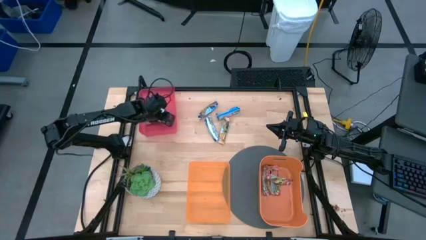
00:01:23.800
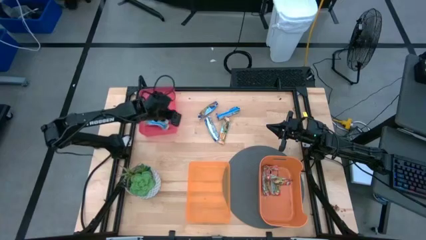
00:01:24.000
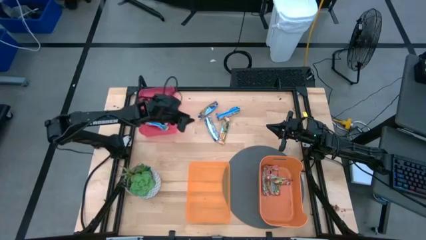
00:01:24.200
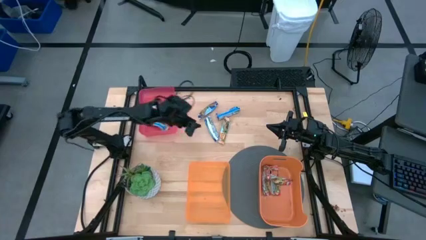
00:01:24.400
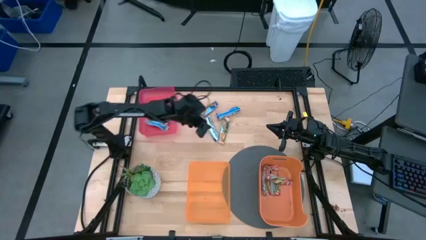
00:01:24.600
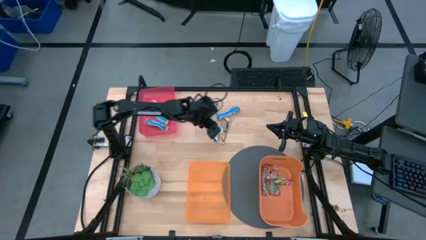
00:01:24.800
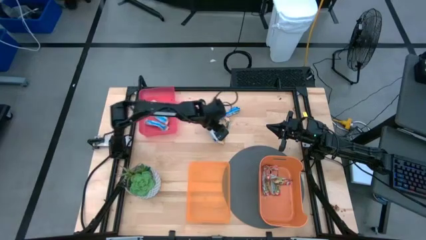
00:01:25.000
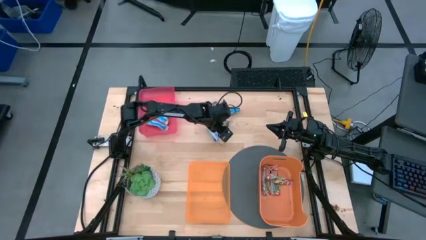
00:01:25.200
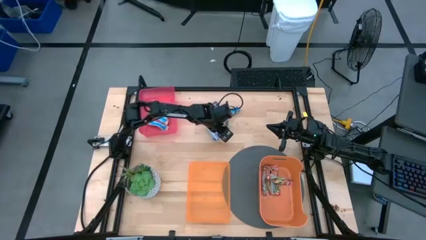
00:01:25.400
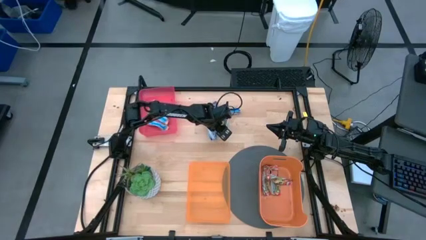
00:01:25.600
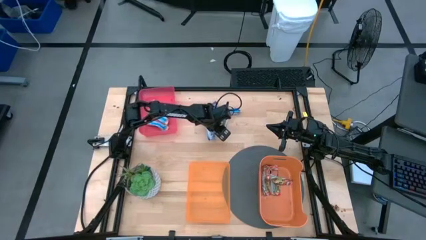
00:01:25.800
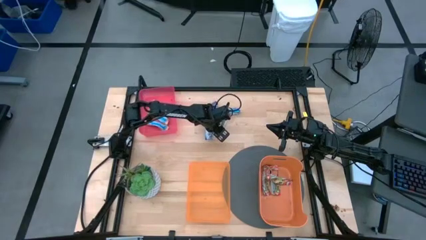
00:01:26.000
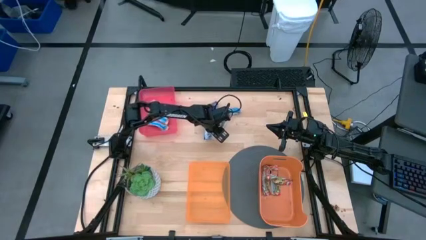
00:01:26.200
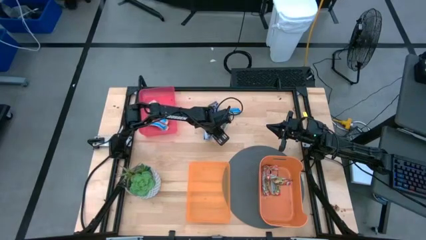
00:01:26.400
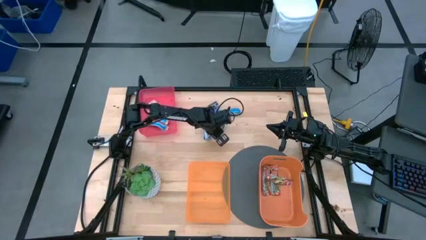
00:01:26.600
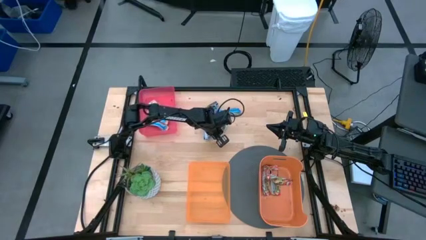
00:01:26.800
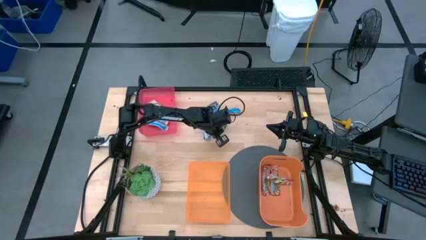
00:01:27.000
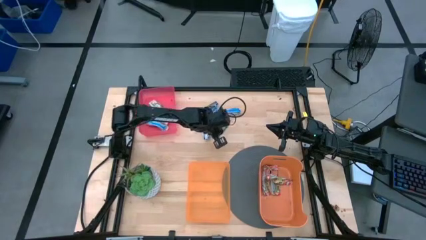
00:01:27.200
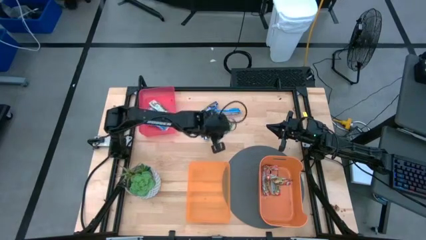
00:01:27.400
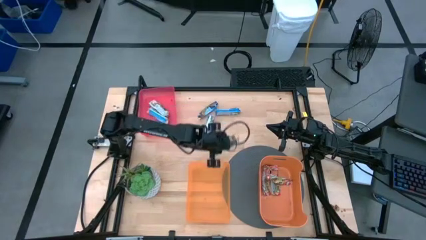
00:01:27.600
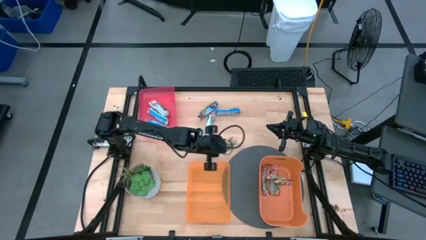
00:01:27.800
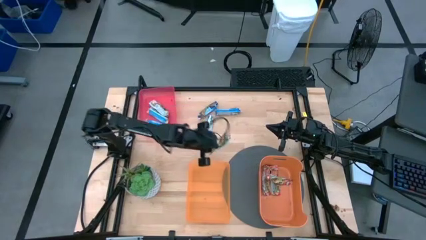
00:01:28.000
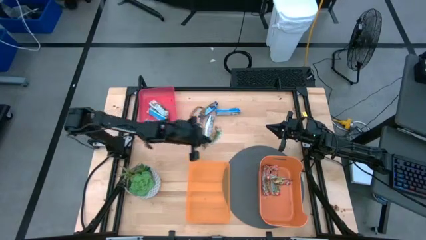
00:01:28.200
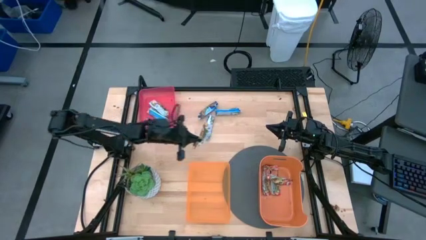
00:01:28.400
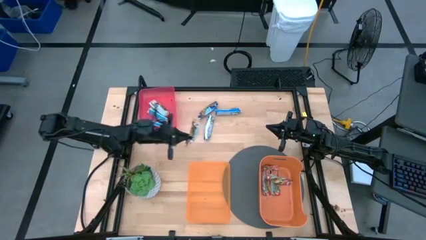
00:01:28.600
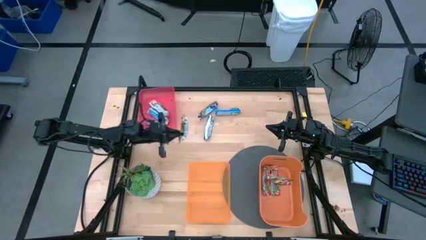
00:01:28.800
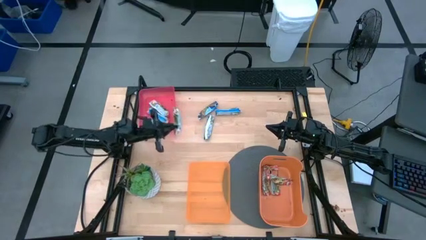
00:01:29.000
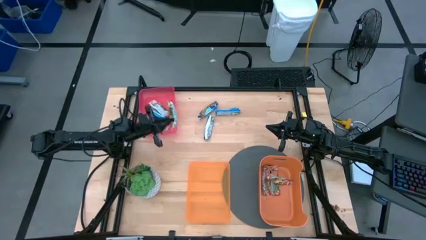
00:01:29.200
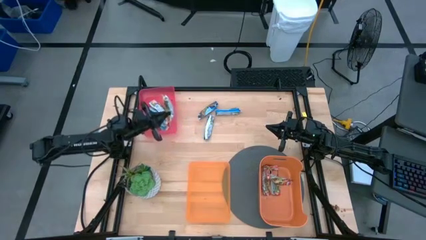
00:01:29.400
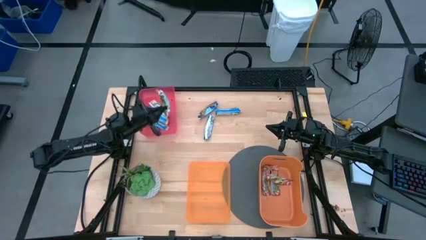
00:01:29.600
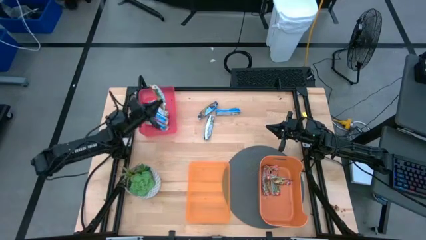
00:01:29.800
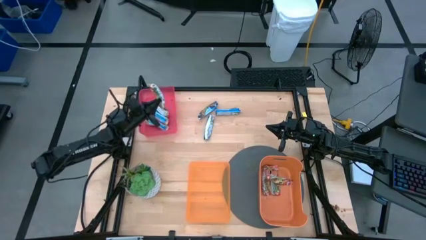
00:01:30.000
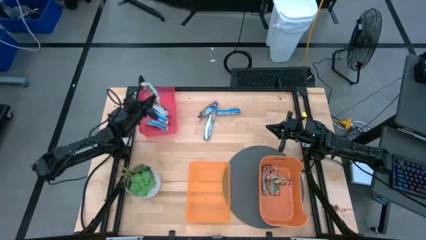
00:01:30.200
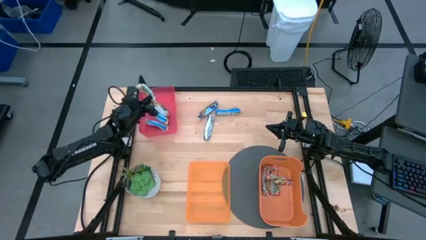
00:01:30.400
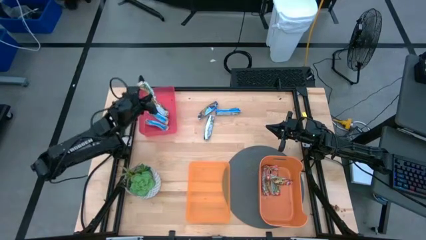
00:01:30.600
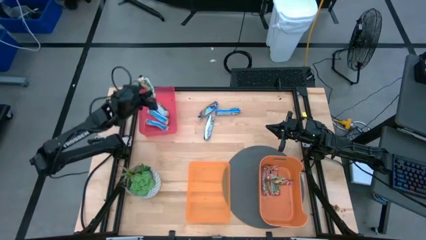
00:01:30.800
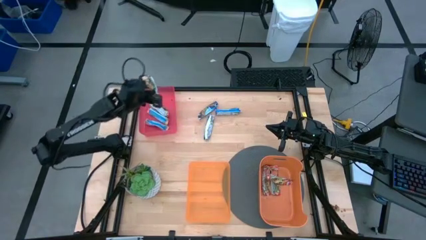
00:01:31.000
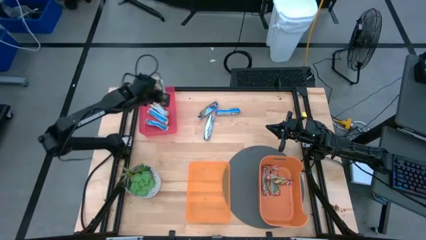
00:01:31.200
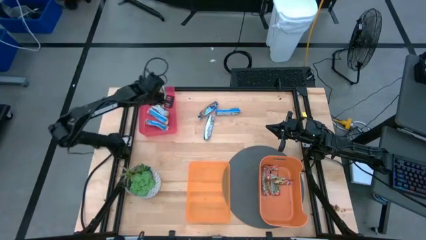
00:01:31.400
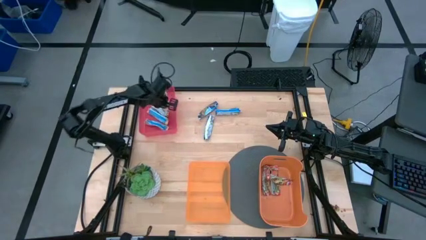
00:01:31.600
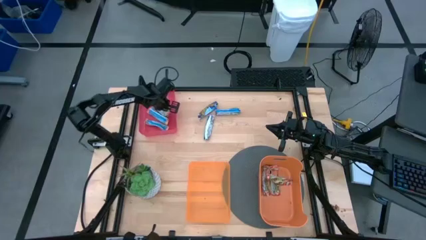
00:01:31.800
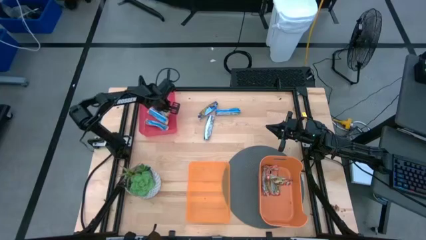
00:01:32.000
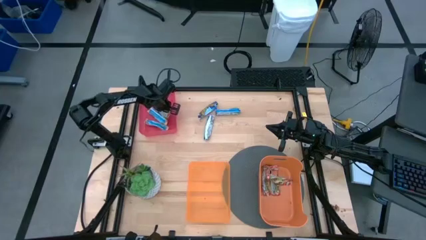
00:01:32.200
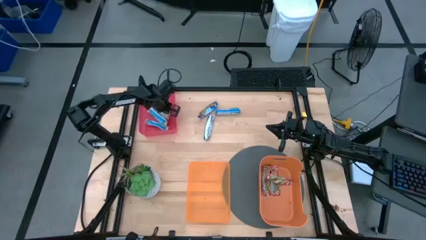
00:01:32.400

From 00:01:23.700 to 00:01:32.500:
Task: Pick and place Granola Bars by type
Put the yellow granola bar into the red bin

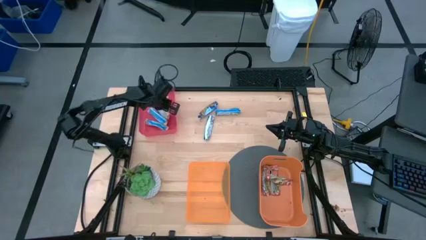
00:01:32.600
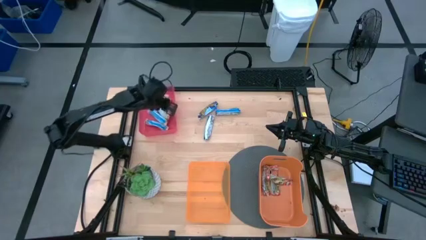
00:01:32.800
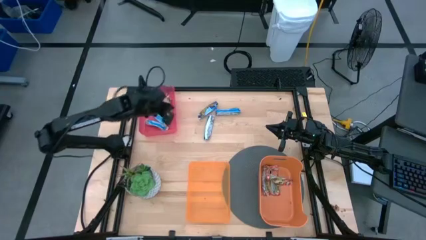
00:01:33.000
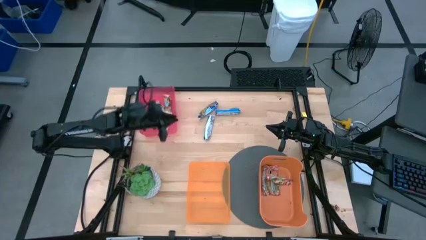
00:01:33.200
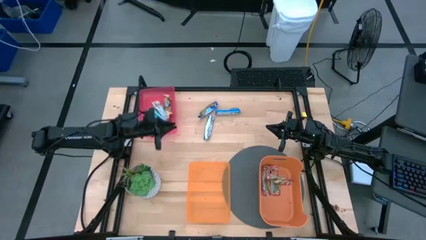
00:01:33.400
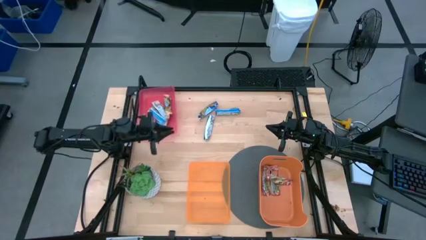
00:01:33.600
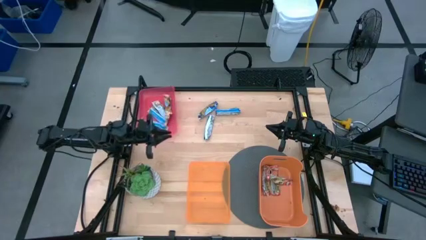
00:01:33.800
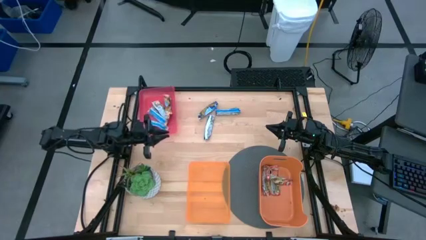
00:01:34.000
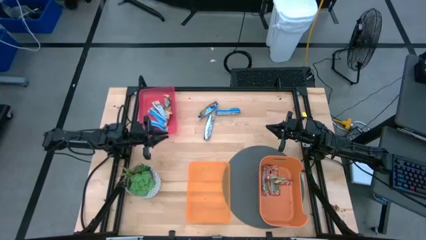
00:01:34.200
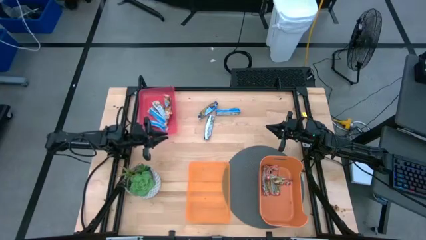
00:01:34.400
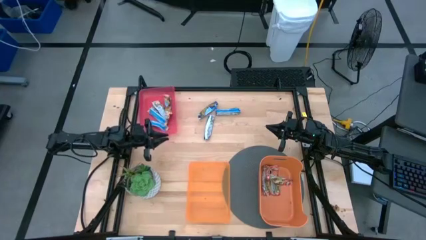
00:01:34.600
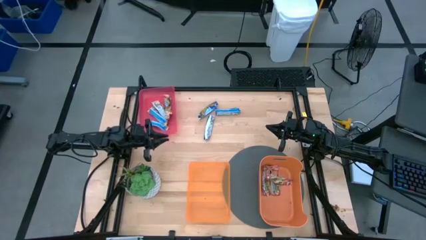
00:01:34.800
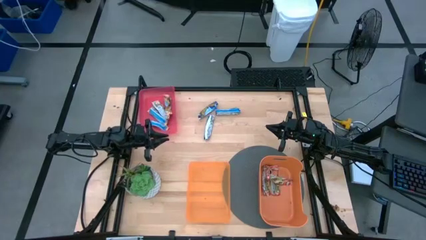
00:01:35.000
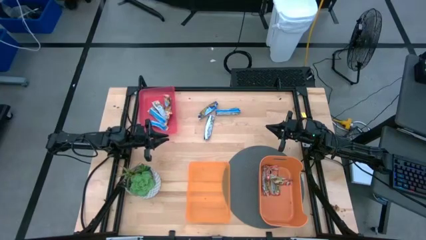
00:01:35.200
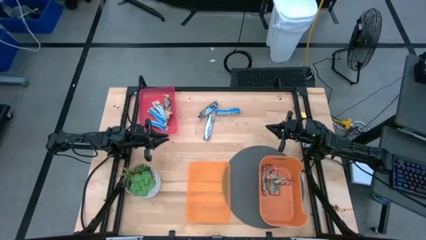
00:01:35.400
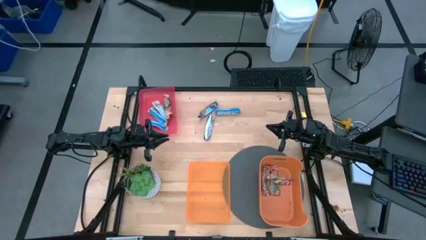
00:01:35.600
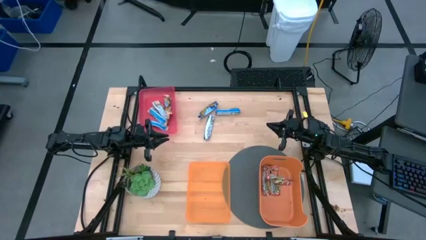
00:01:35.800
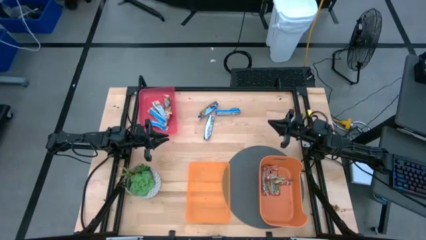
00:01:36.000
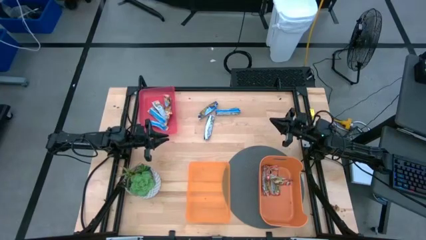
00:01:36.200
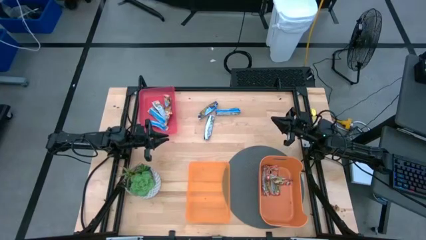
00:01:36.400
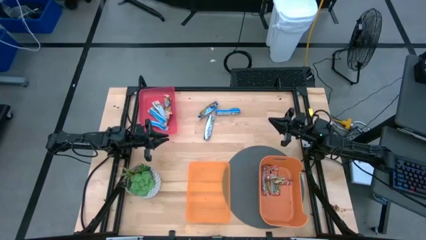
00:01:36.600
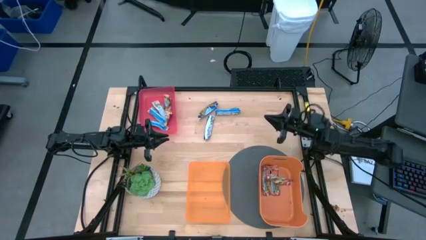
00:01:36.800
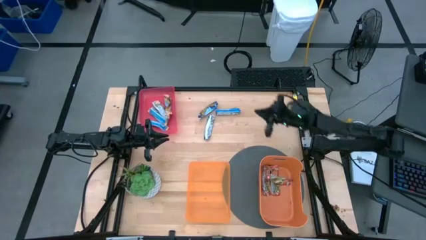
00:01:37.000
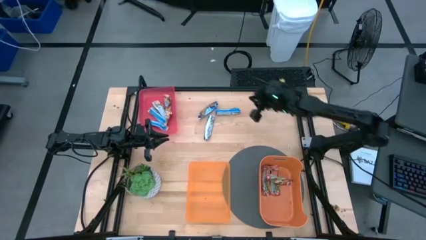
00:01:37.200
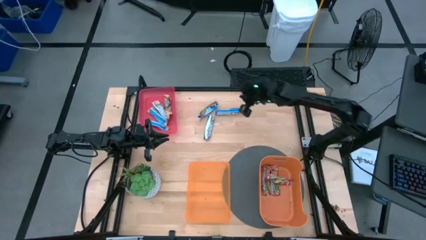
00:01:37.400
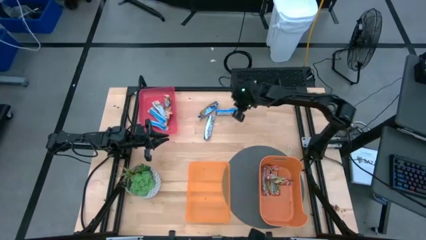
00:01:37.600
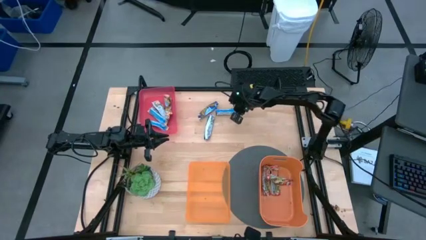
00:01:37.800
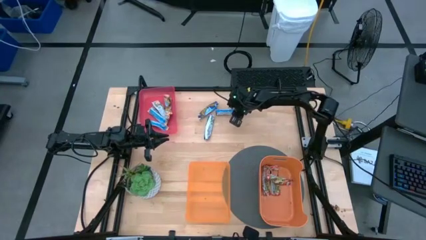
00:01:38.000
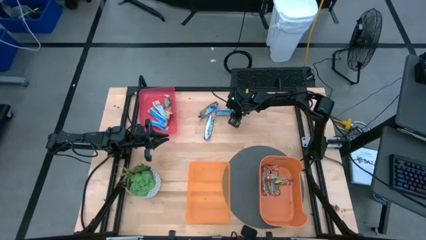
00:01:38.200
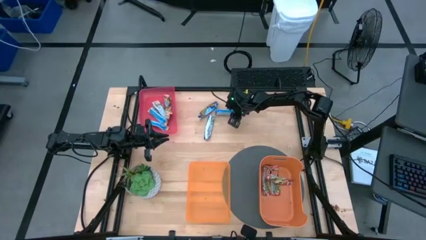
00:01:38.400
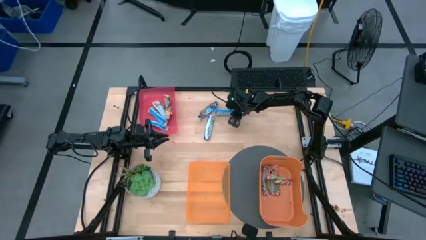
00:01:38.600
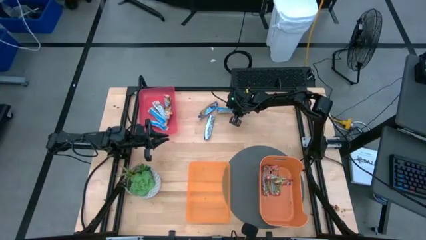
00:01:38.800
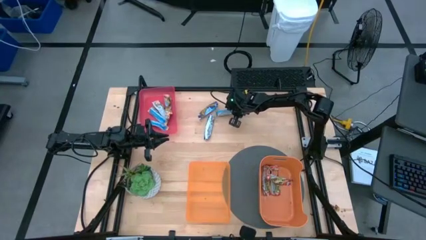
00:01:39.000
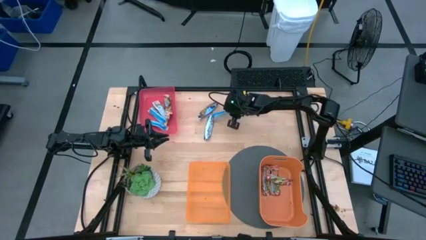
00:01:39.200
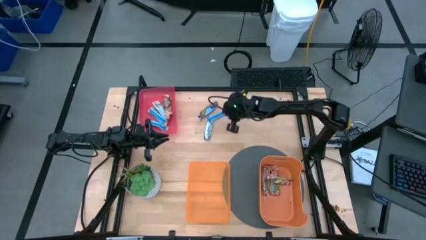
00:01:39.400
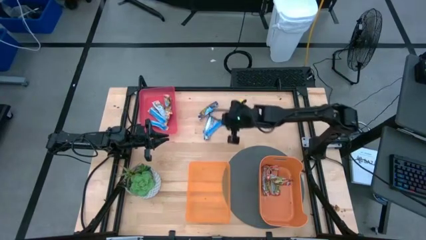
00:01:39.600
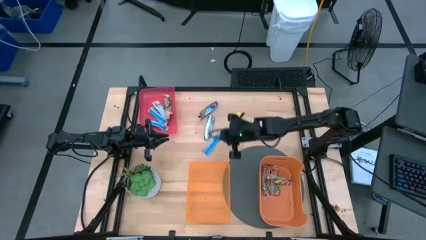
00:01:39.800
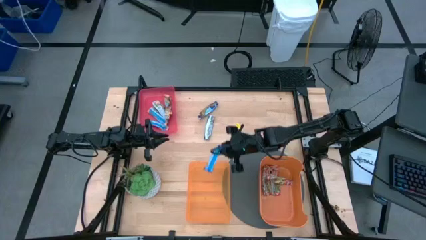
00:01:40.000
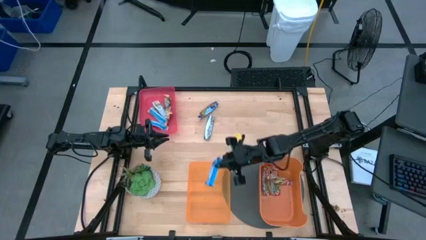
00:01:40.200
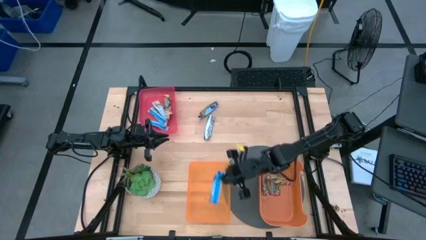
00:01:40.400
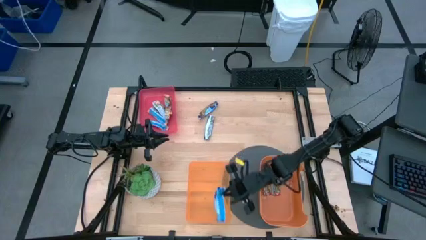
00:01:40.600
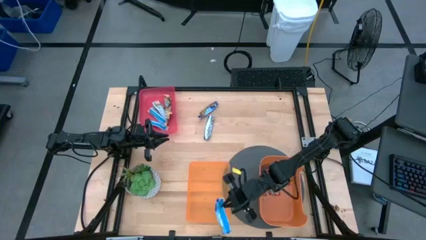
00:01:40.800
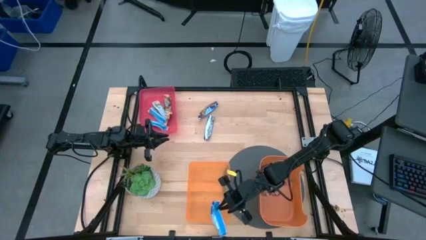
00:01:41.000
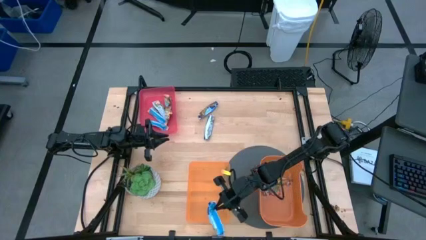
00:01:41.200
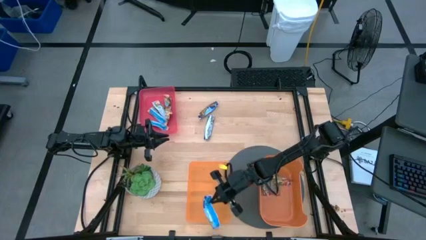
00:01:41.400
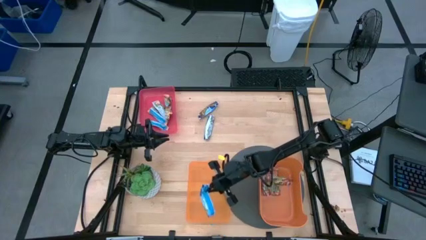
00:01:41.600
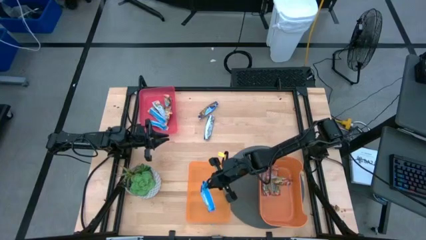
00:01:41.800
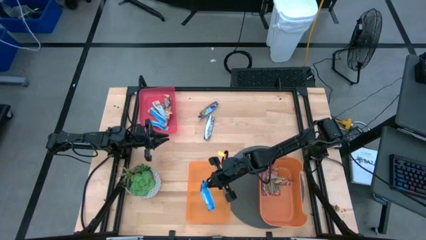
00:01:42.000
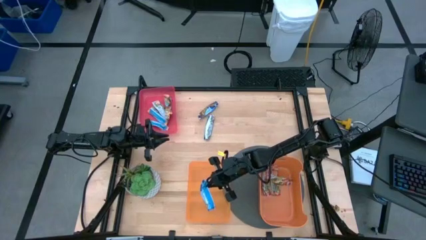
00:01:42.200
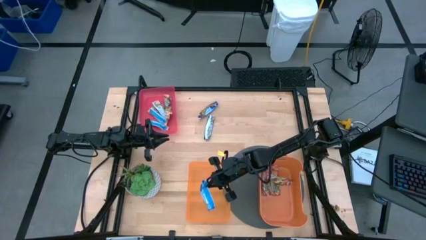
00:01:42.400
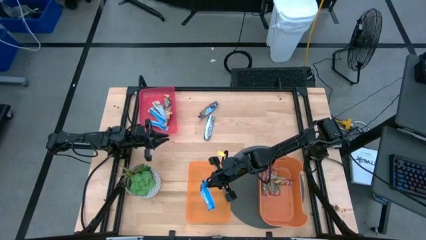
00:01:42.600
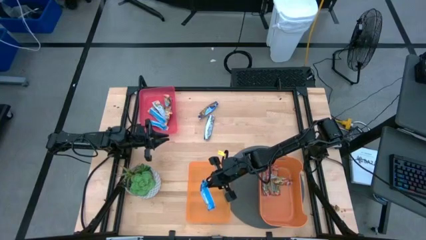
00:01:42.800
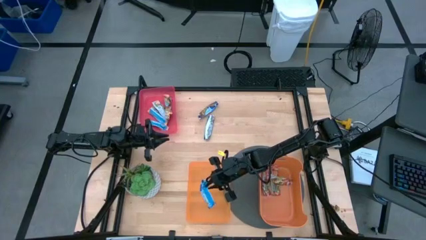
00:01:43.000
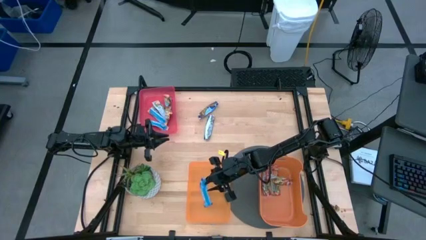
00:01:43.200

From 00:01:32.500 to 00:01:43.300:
Put the right blue granola bar into the left orange bin
